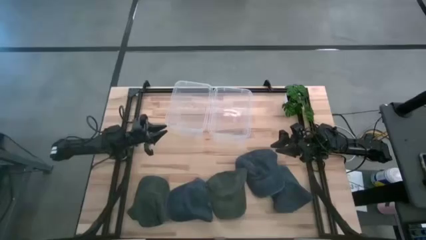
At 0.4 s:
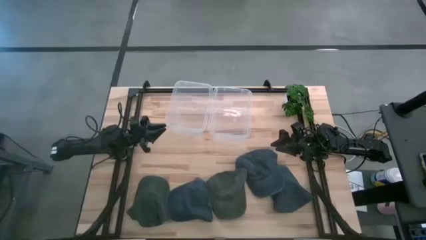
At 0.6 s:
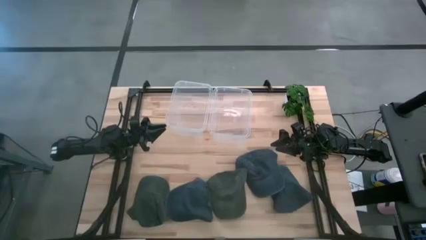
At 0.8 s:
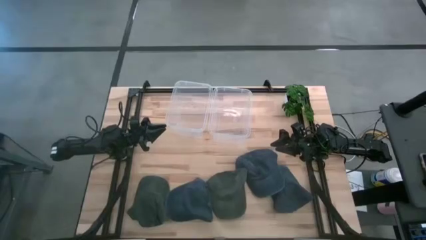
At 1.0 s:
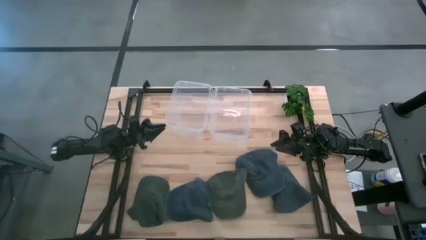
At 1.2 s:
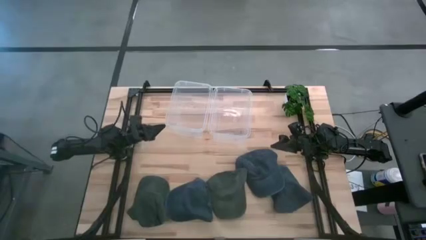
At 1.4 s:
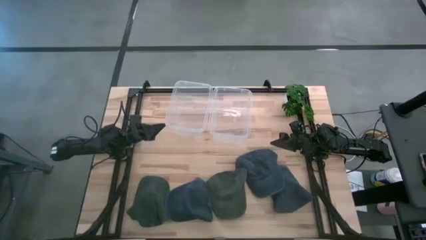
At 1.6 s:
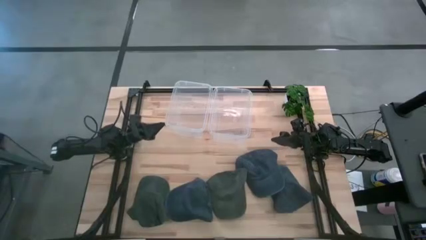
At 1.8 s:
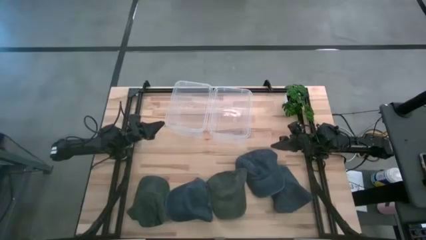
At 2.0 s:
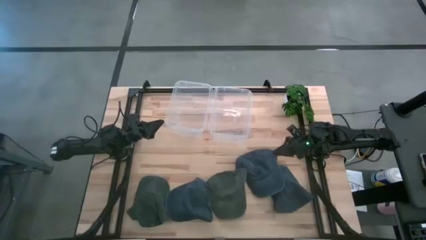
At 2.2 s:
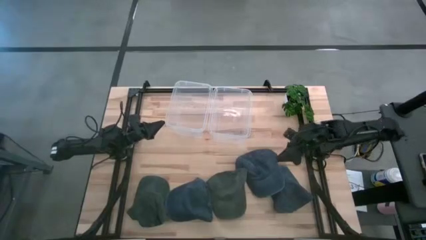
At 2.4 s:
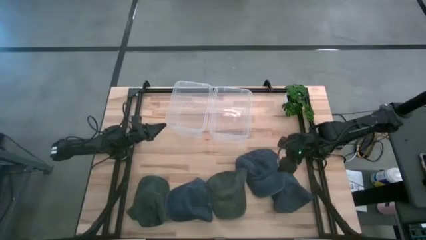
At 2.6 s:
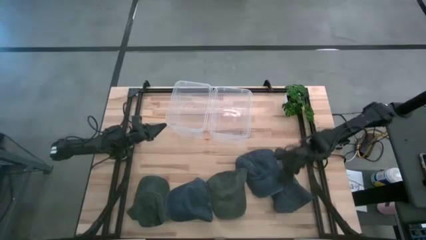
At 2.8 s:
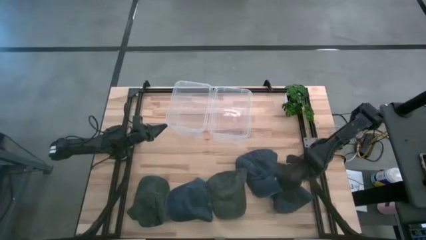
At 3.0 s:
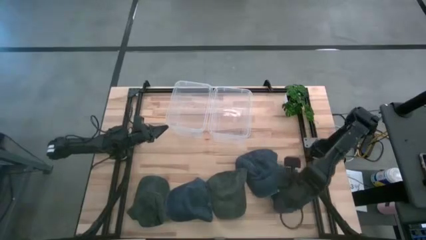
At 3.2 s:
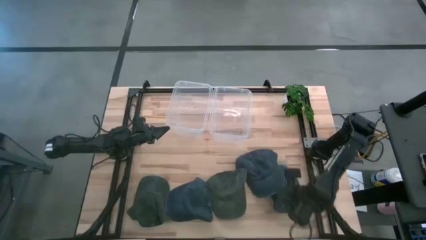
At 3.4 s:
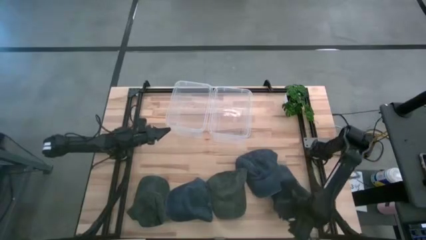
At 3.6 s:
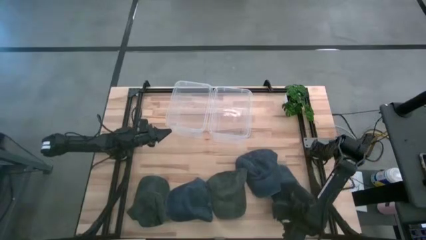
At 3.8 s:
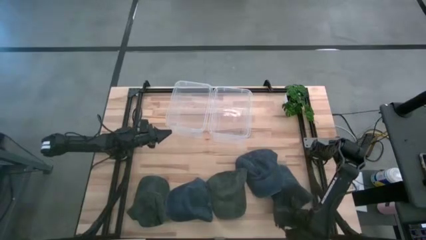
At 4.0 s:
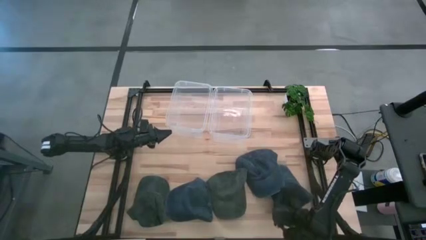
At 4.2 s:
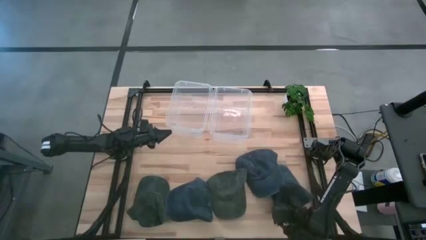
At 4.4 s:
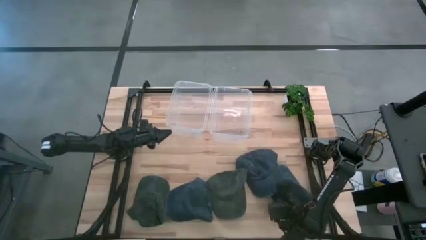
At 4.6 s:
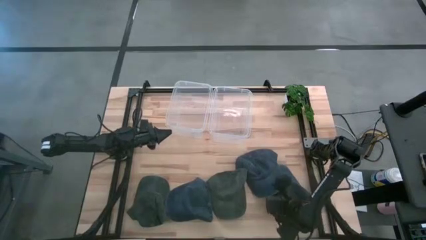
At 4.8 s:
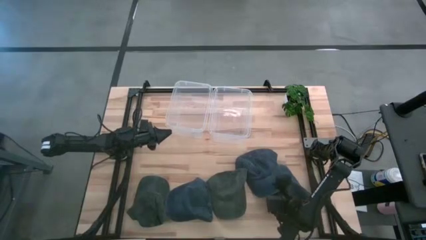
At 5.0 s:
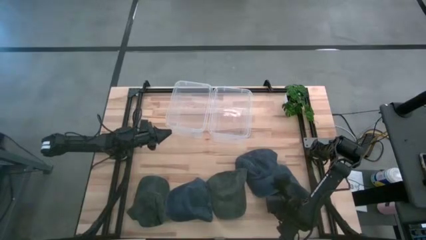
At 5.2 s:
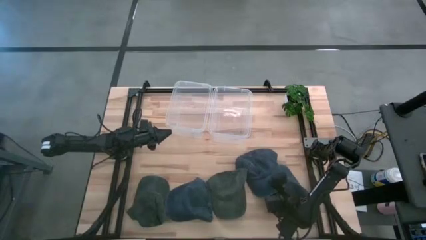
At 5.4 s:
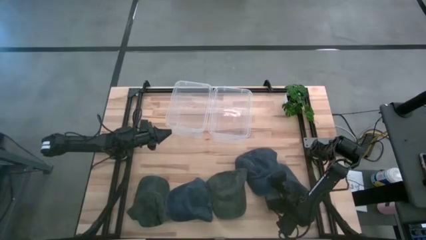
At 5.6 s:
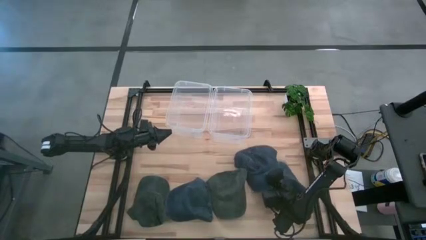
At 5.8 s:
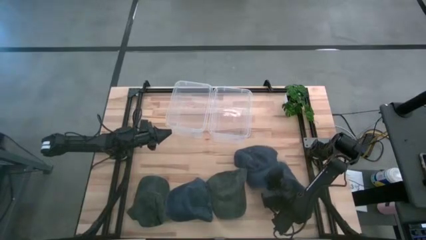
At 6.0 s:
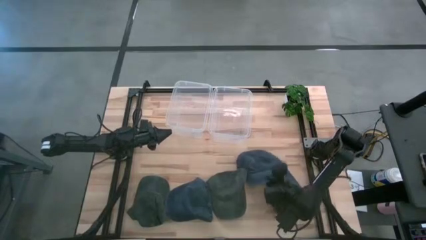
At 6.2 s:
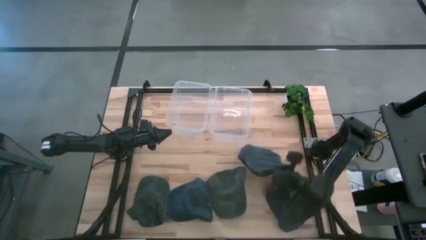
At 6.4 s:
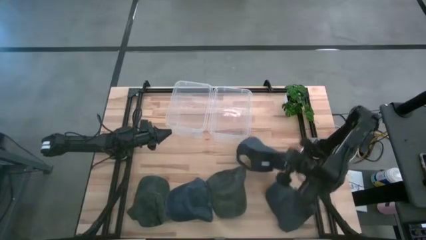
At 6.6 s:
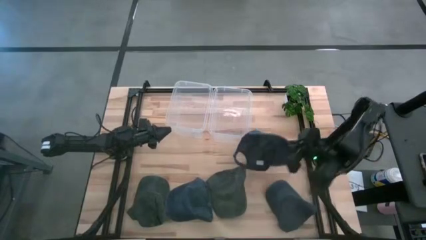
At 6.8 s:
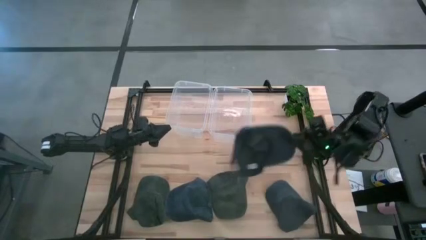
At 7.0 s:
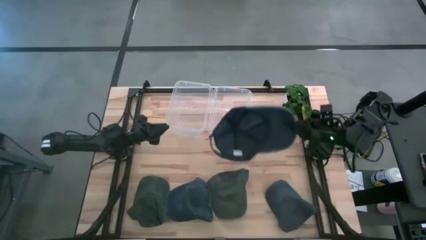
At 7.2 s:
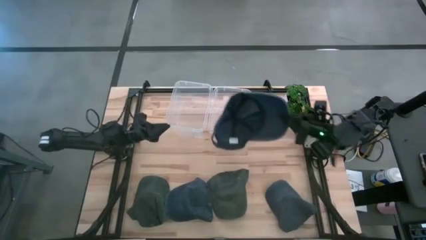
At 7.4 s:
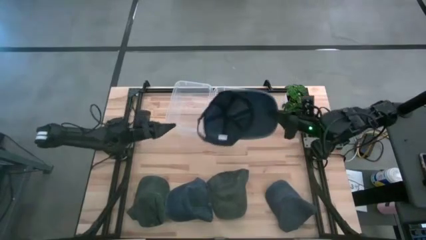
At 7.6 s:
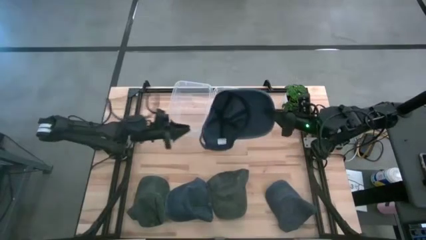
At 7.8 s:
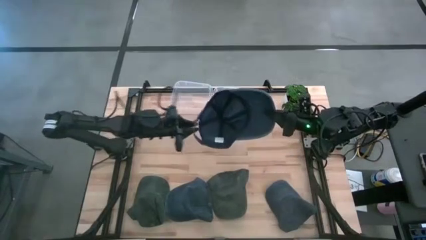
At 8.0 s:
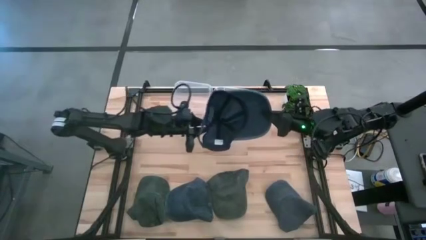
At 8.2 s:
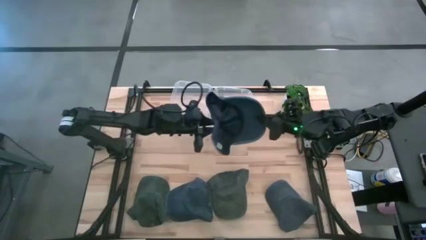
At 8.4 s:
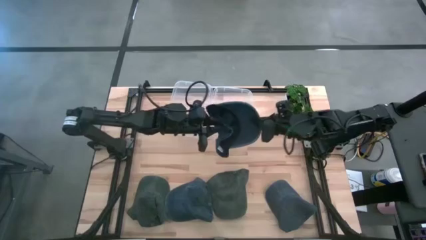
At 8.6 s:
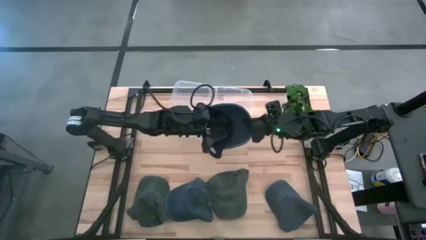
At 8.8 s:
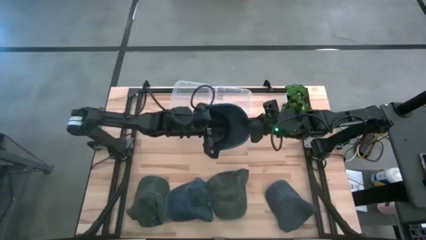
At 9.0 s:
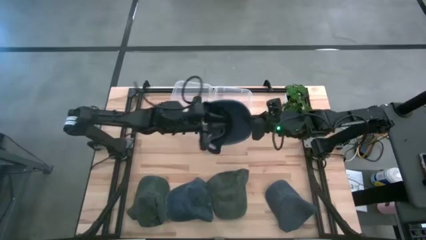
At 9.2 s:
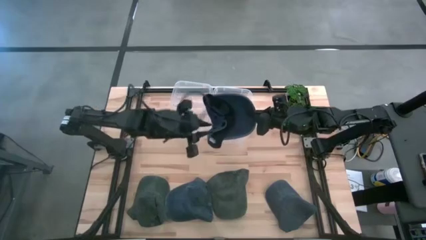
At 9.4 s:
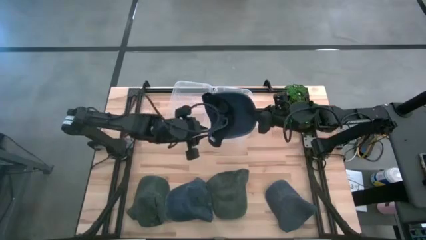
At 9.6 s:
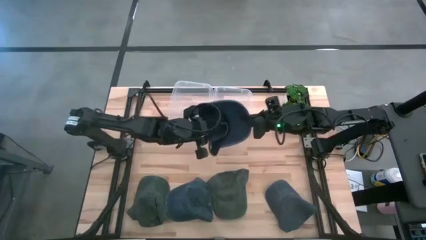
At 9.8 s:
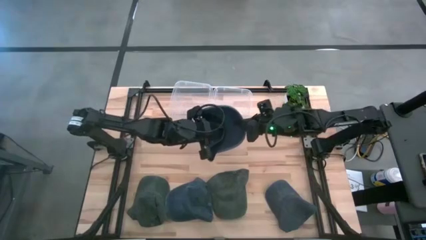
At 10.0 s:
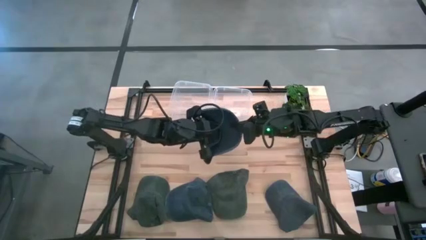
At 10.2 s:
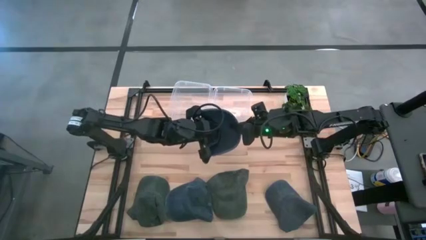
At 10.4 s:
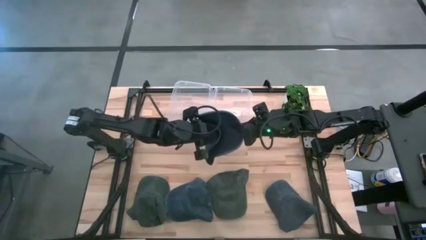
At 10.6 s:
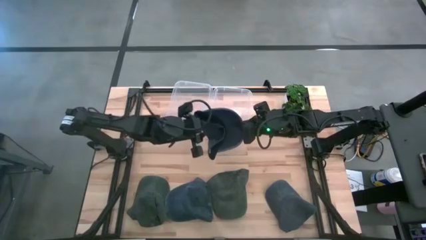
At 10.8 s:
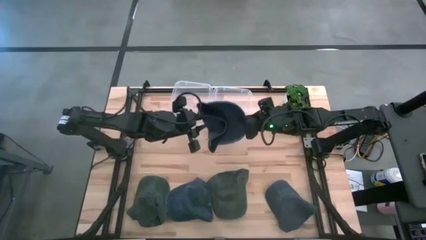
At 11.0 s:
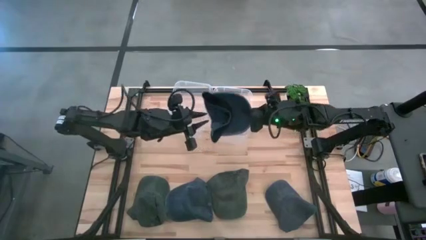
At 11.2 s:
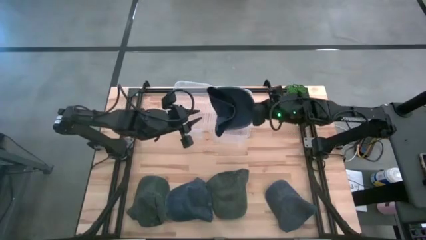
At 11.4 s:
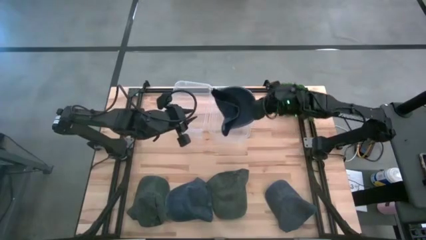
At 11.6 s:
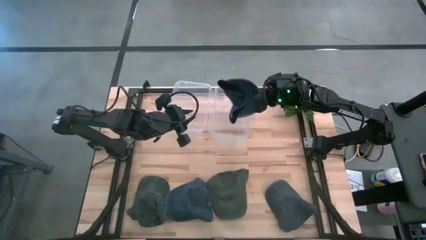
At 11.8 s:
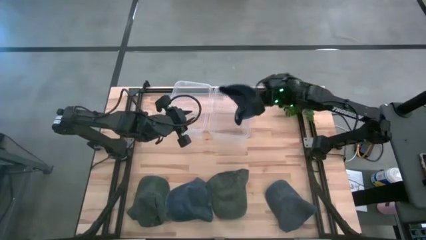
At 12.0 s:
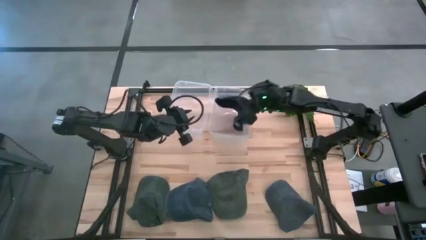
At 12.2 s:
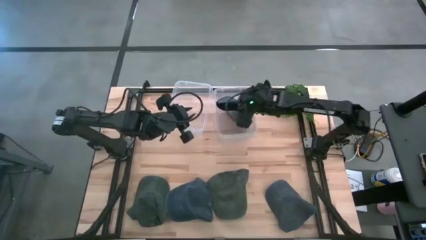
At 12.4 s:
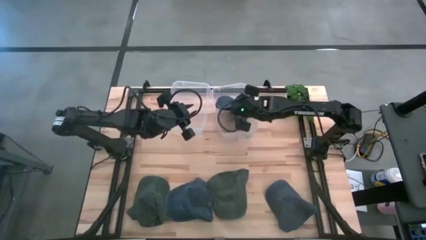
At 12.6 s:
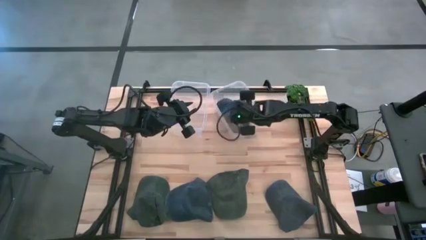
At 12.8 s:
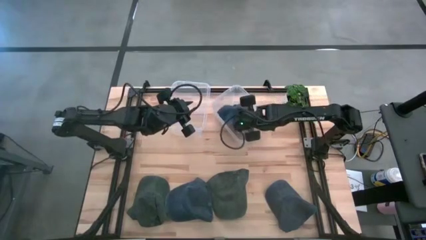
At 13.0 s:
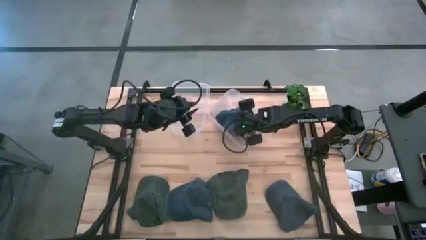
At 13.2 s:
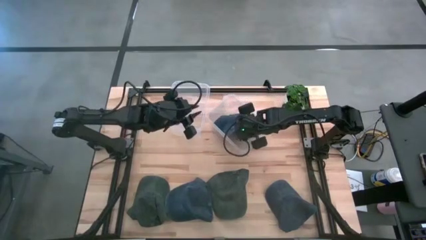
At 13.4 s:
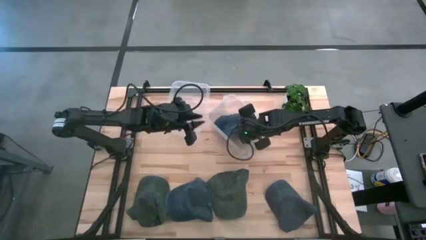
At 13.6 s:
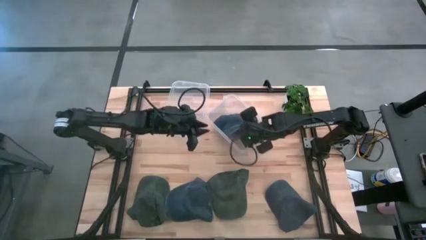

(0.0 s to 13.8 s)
Task: Pick & Place hat
Put the middle blue cap into the right transparent bin
